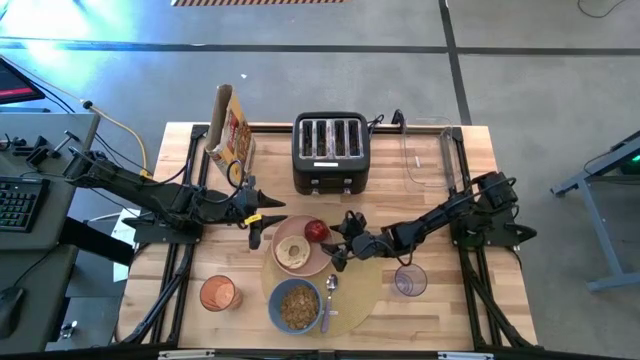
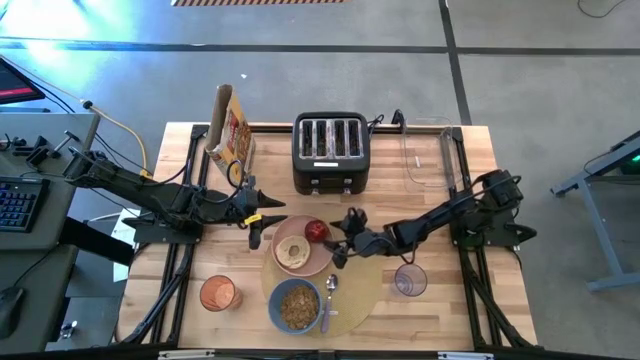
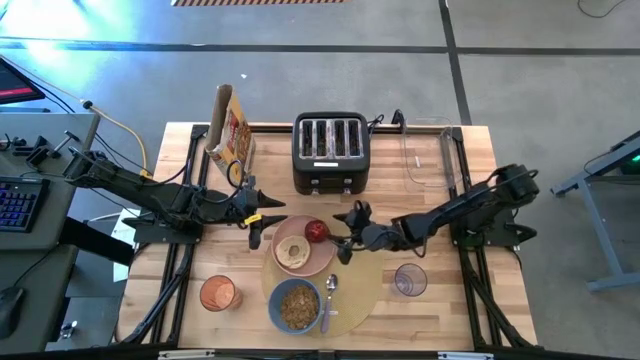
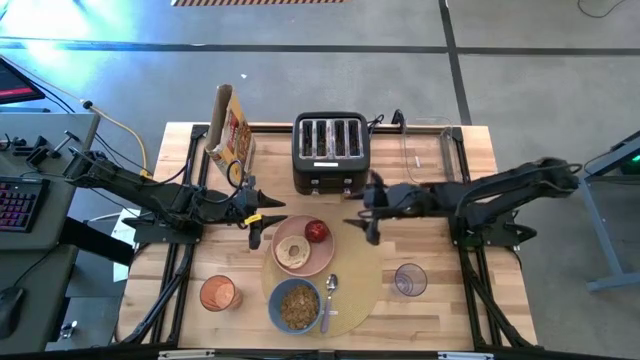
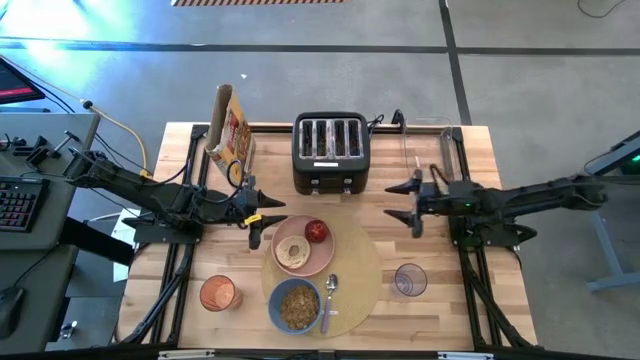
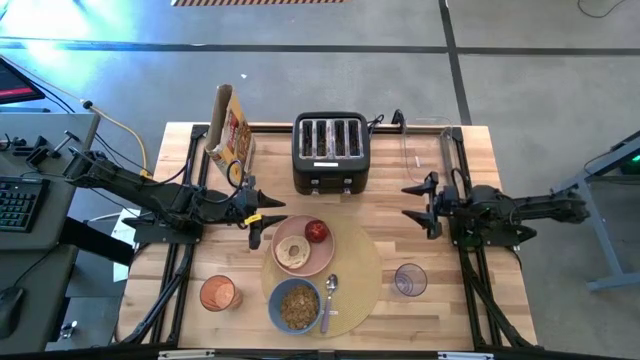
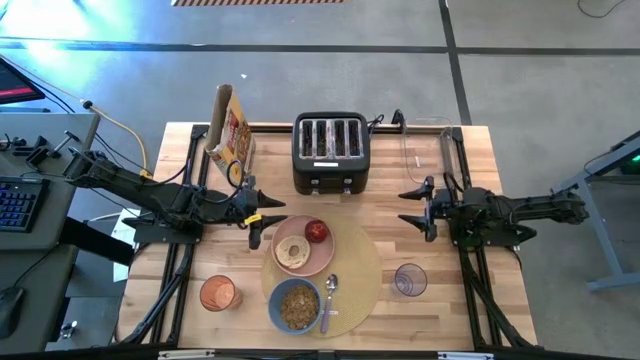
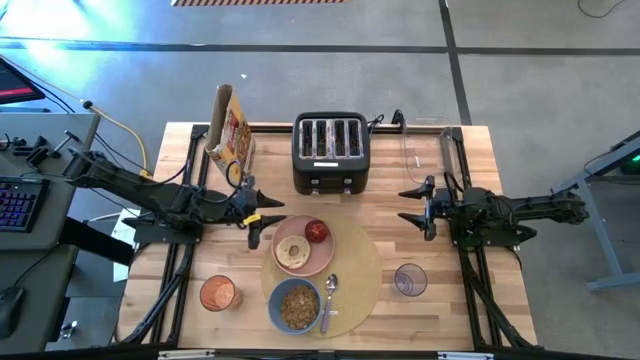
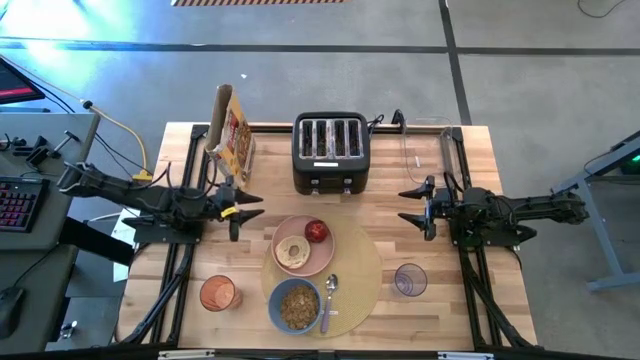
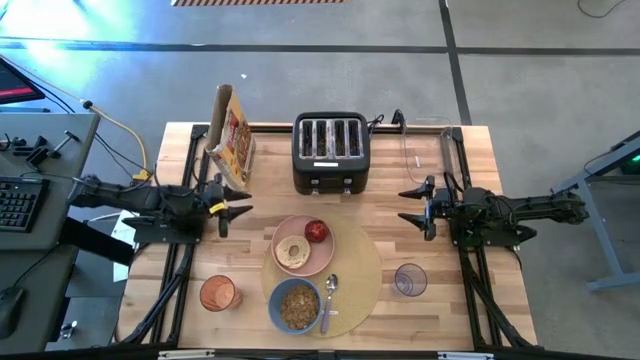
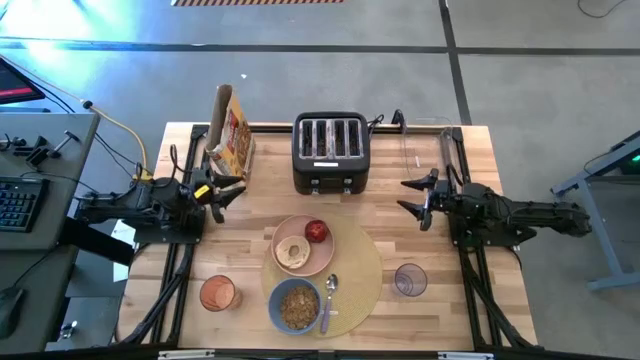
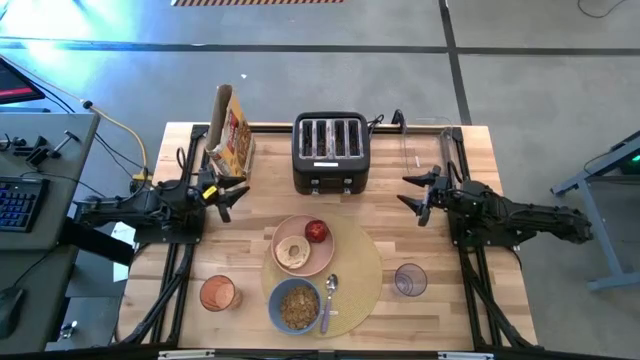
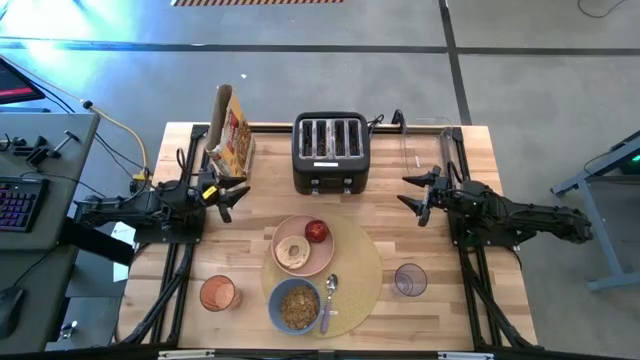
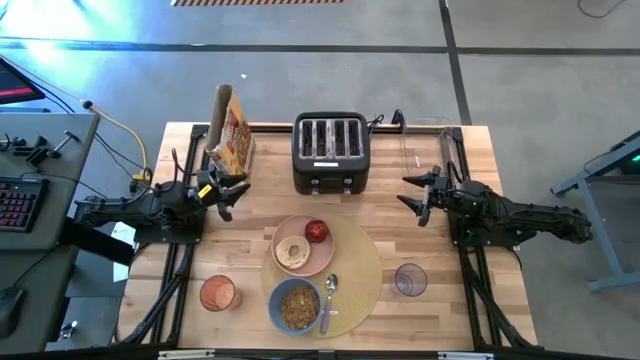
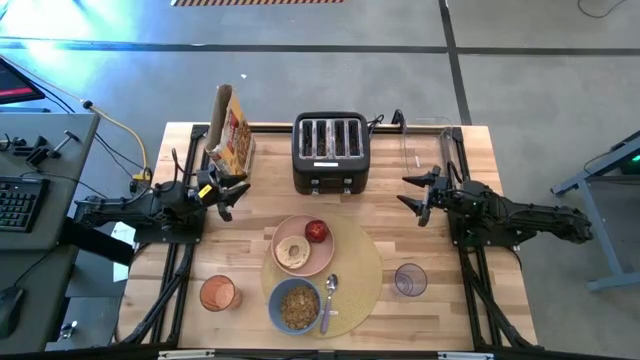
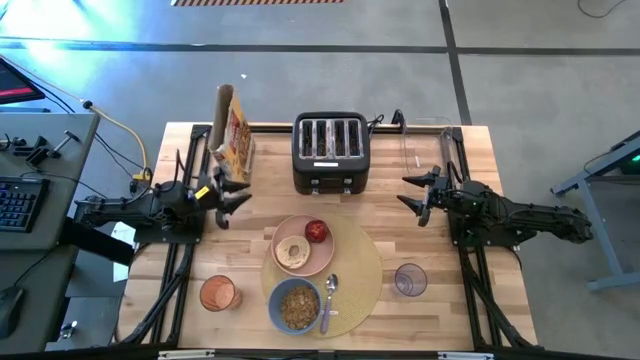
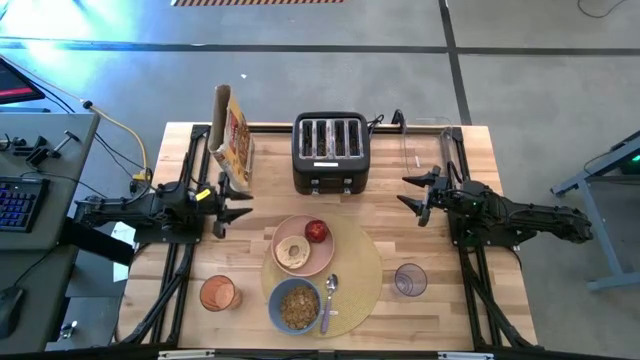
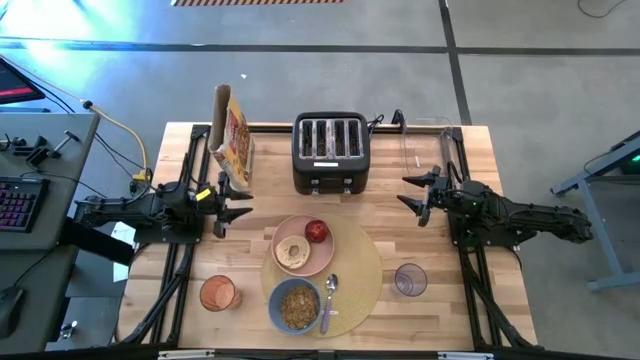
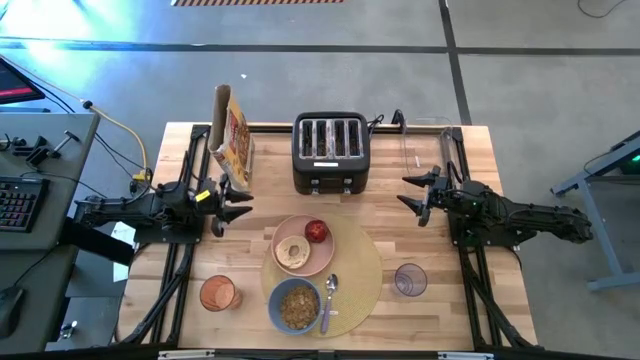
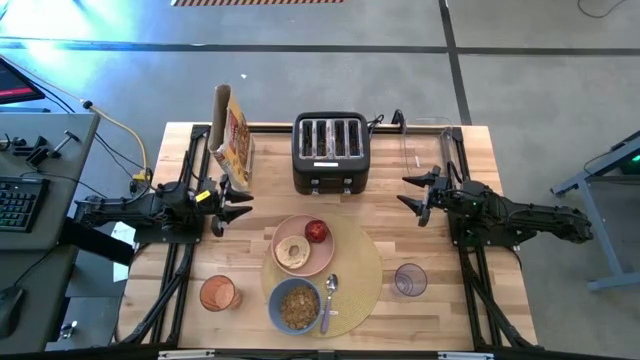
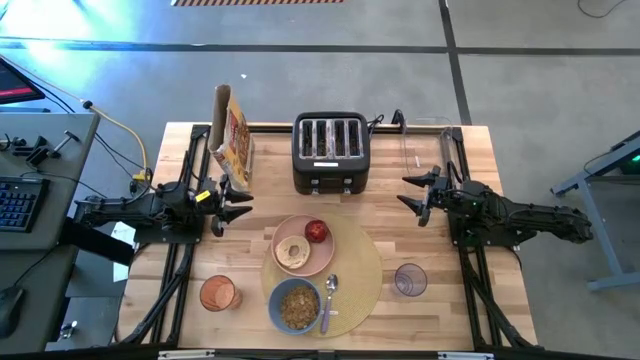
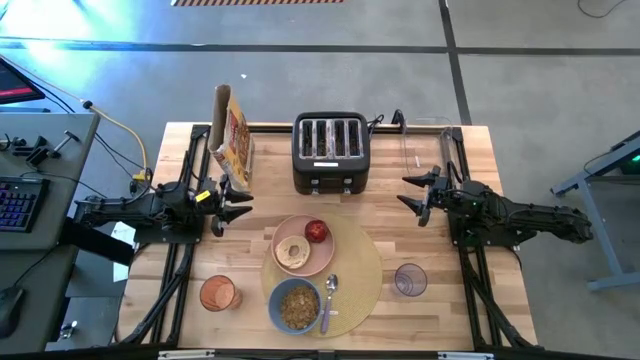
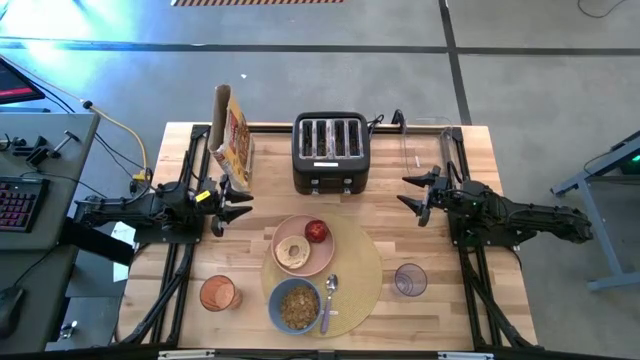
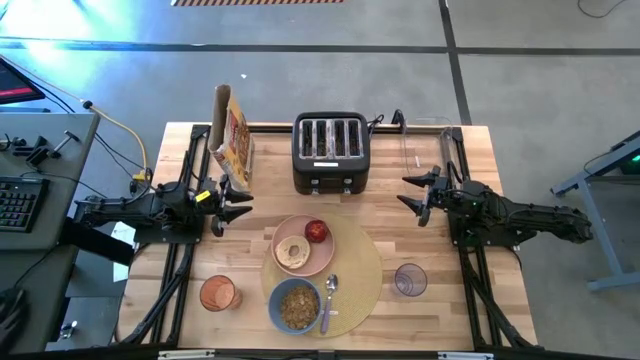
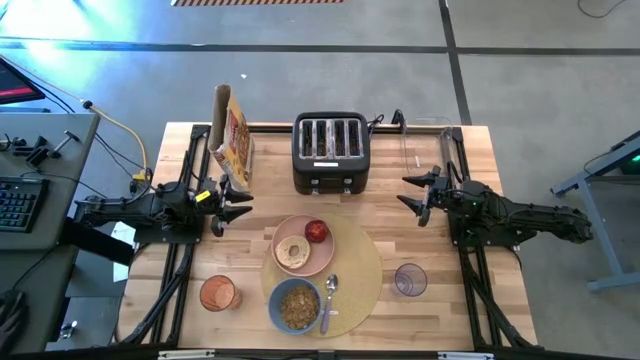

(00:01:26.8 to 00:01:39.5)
Task: Arrange a breakfast setting
Return to Home Position

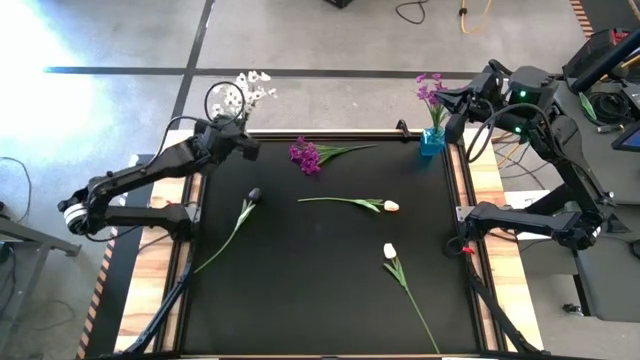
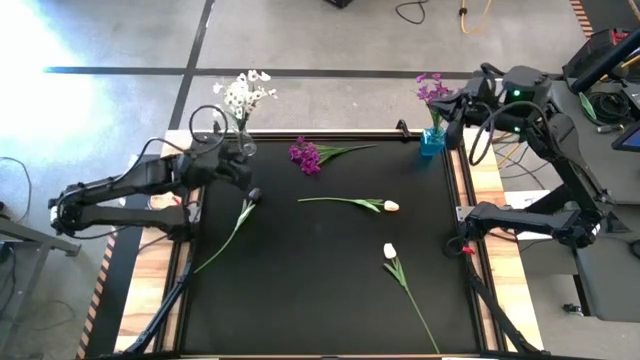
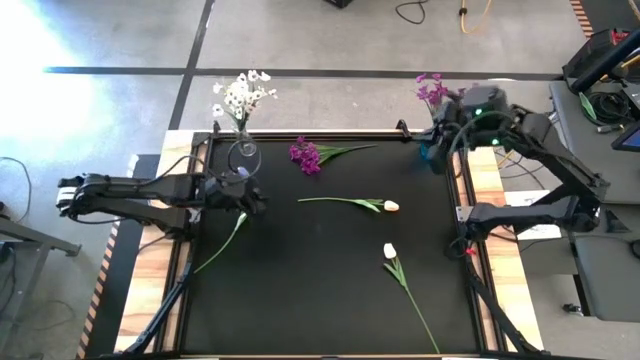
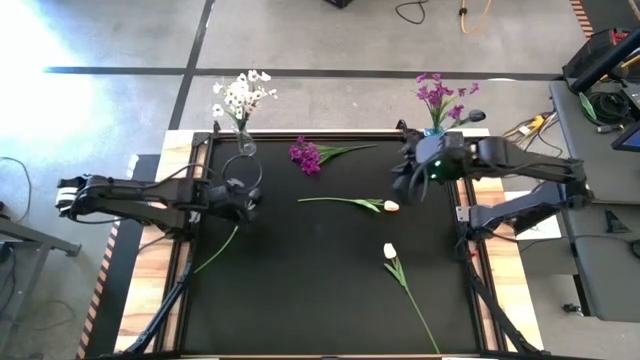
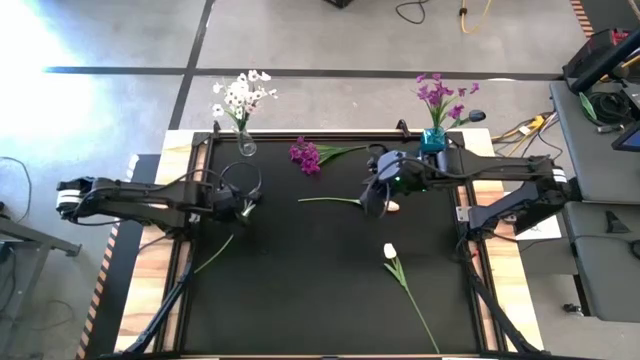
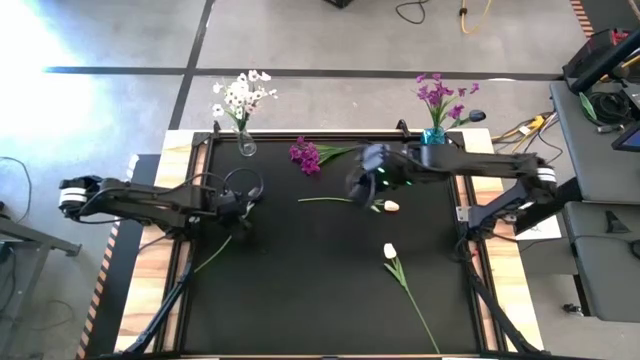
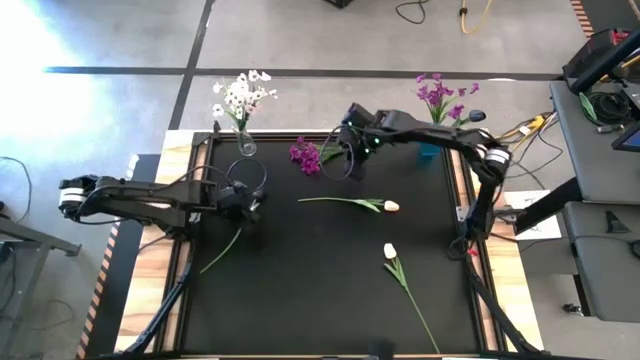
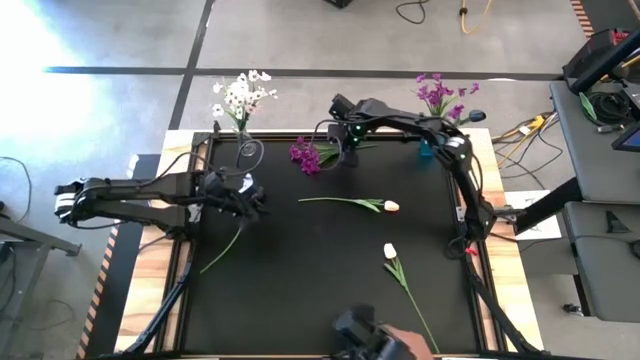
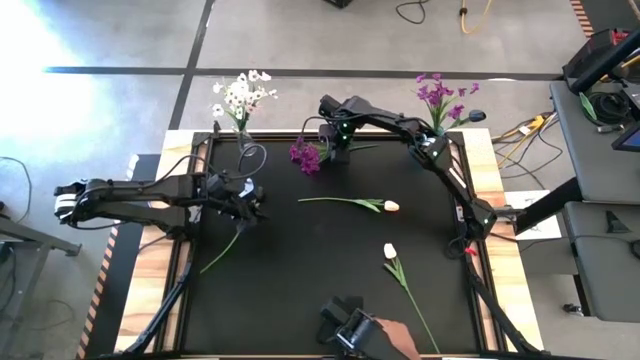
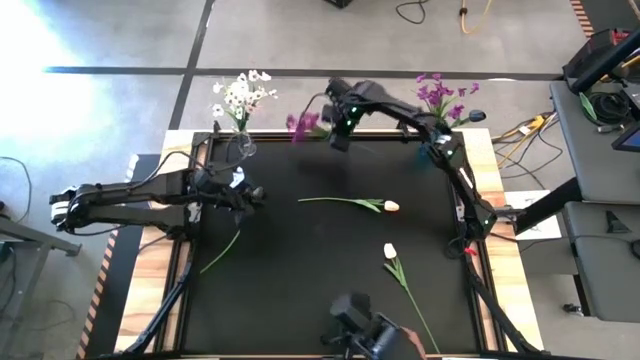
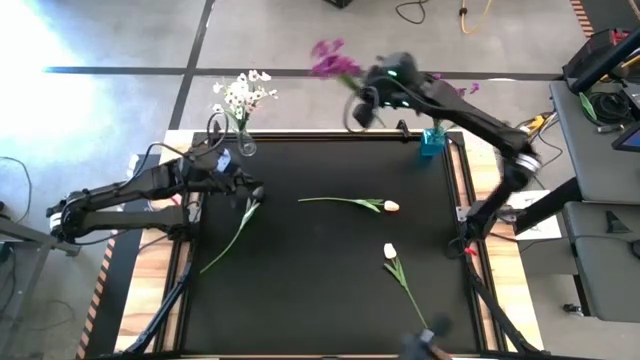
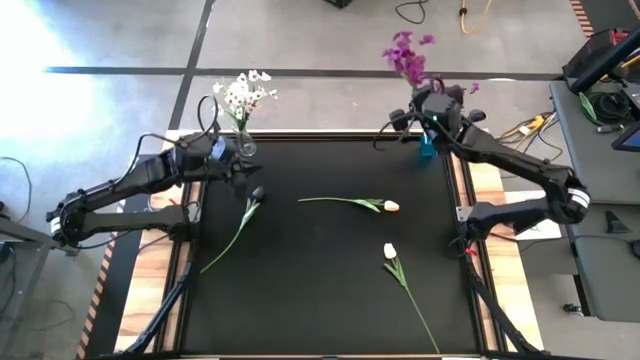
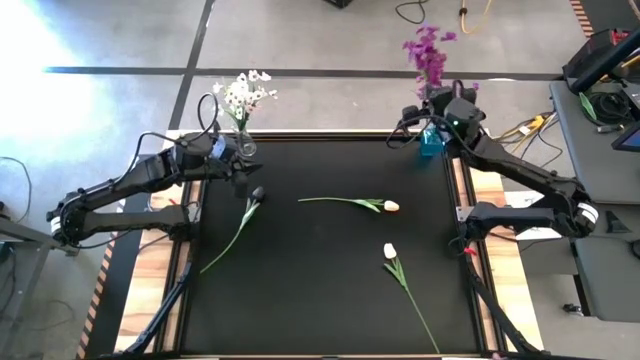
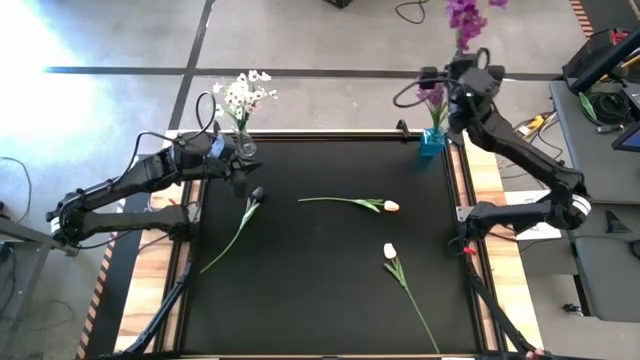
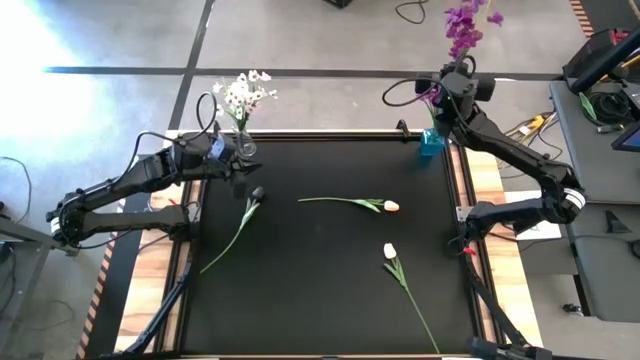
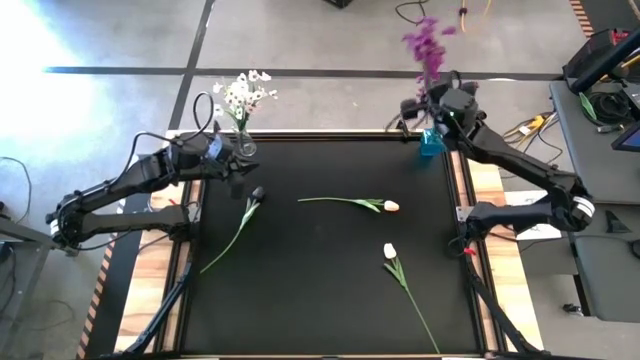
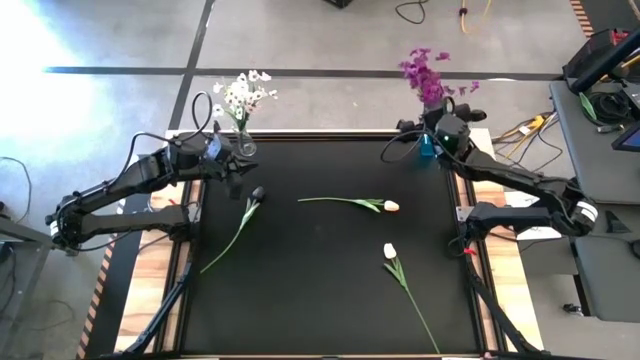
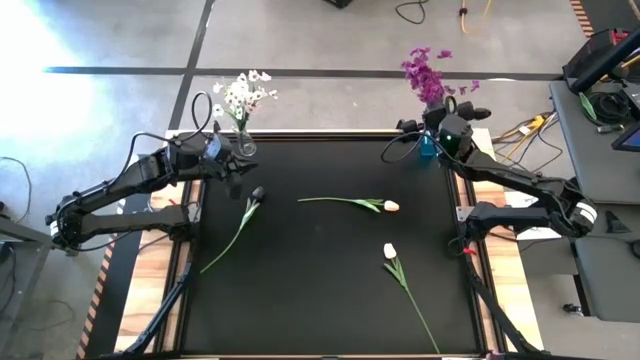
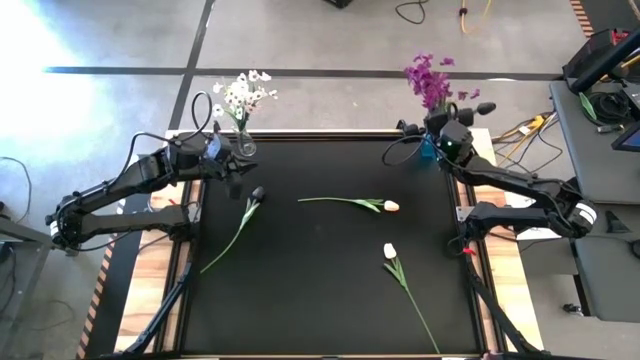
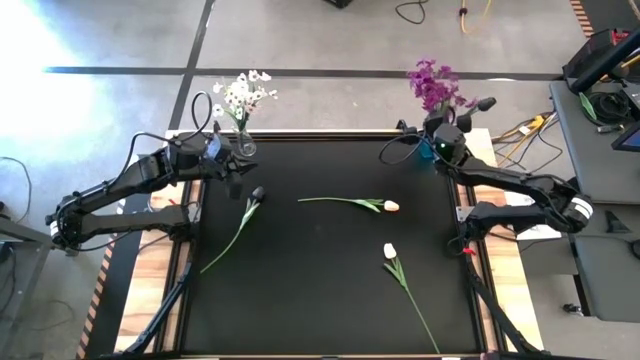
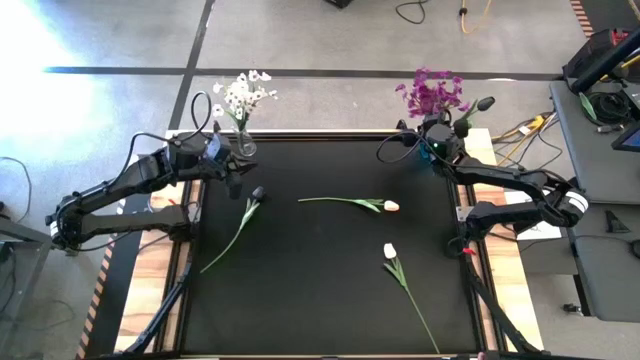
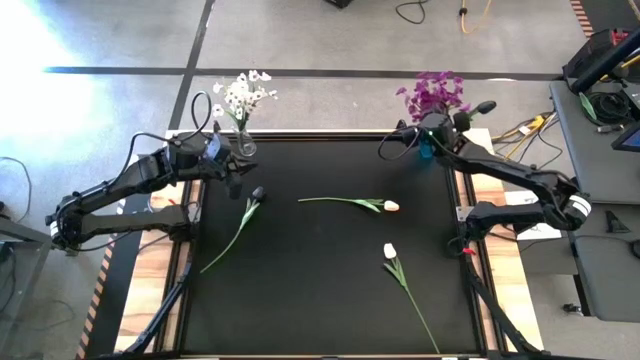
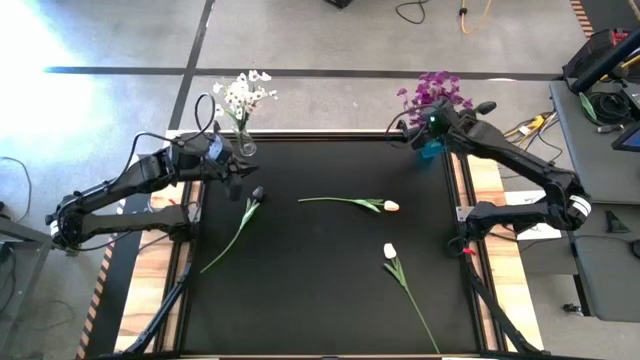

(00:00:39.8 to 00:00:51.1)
Task: Sort flowers into vase by color
Put the violet flowers into the blue vase
